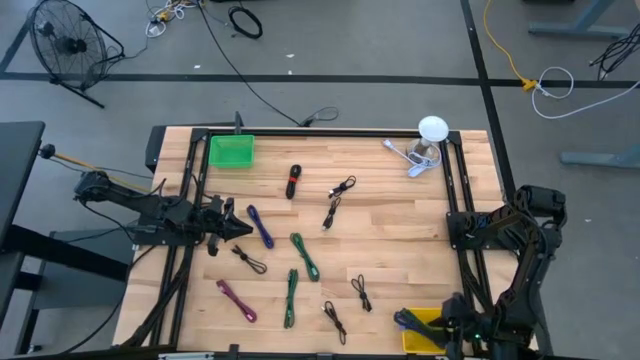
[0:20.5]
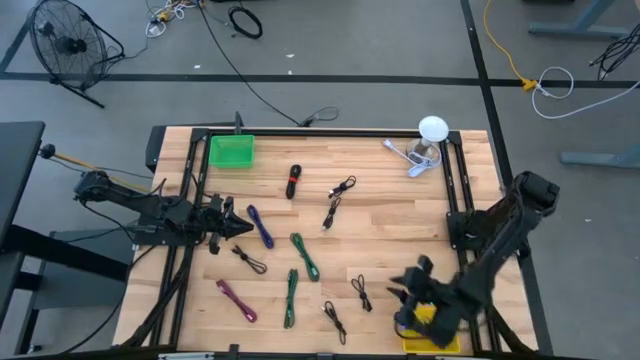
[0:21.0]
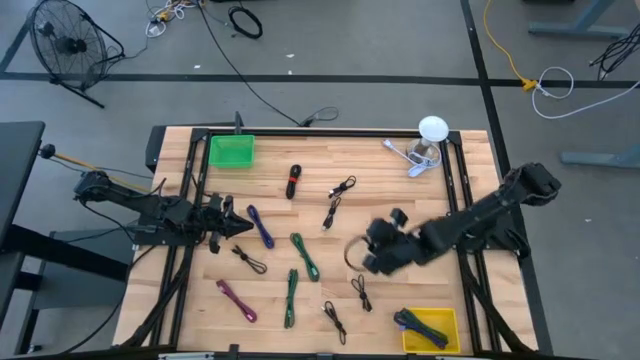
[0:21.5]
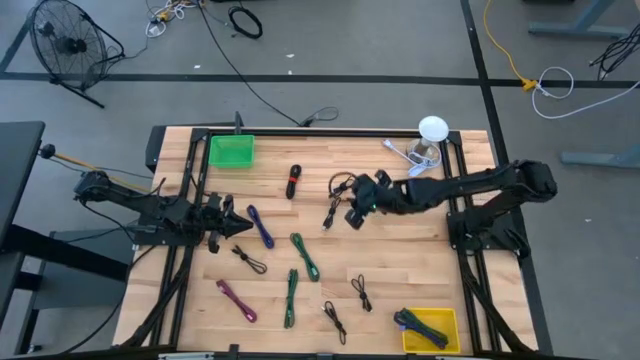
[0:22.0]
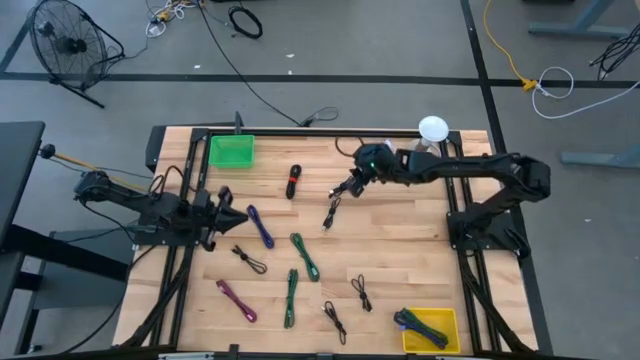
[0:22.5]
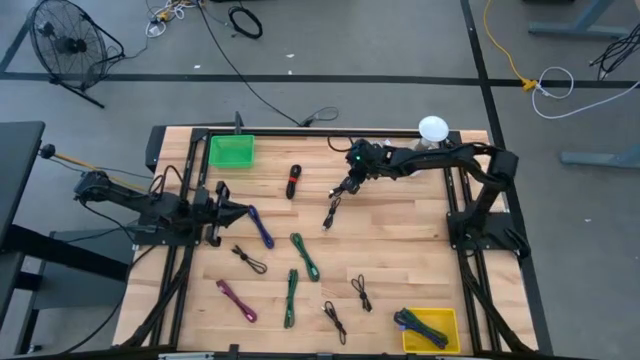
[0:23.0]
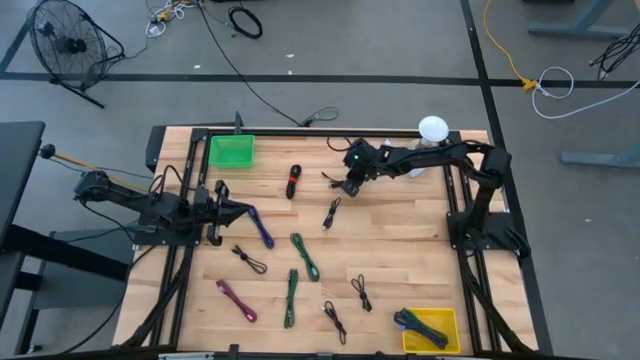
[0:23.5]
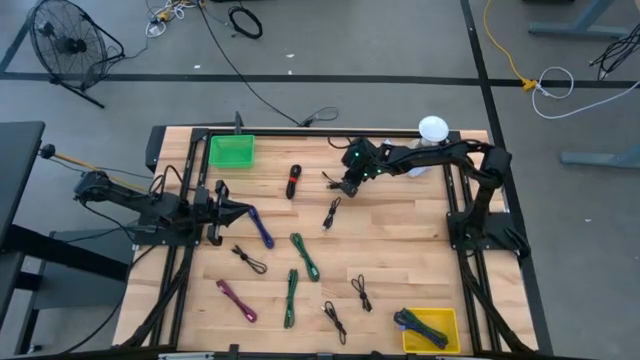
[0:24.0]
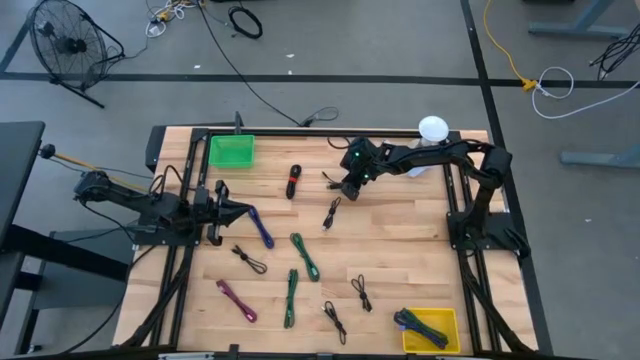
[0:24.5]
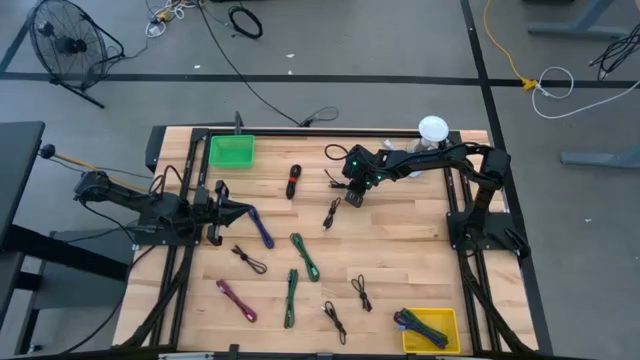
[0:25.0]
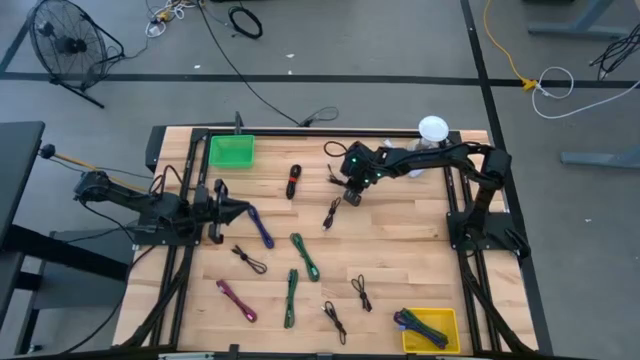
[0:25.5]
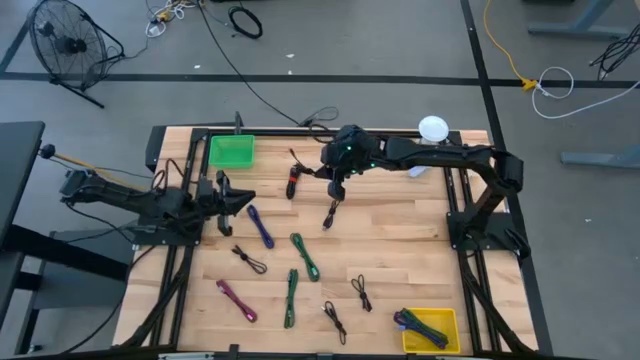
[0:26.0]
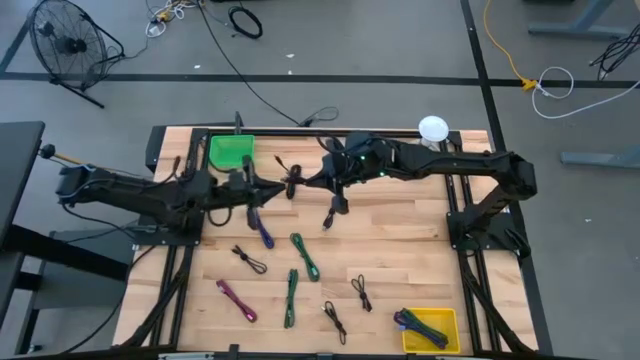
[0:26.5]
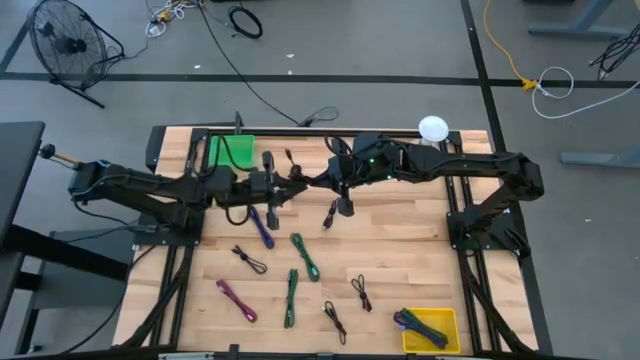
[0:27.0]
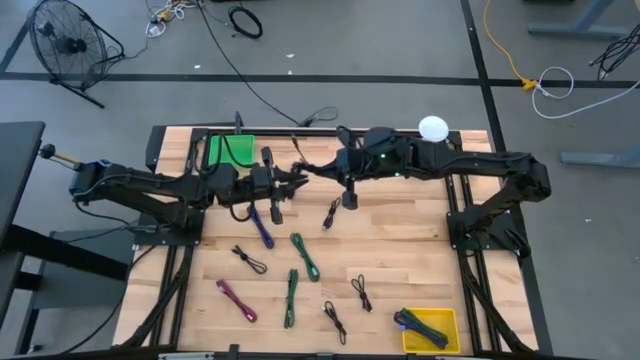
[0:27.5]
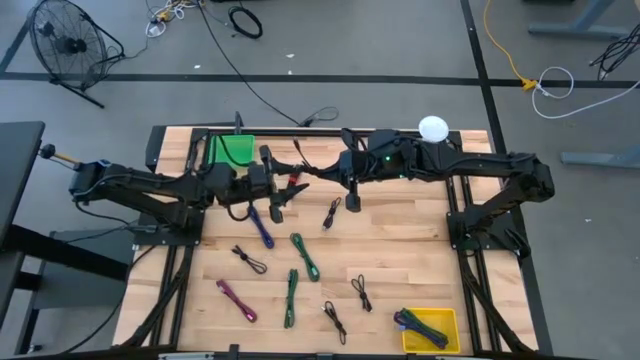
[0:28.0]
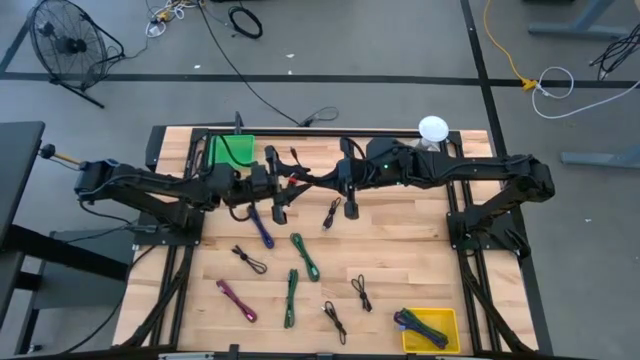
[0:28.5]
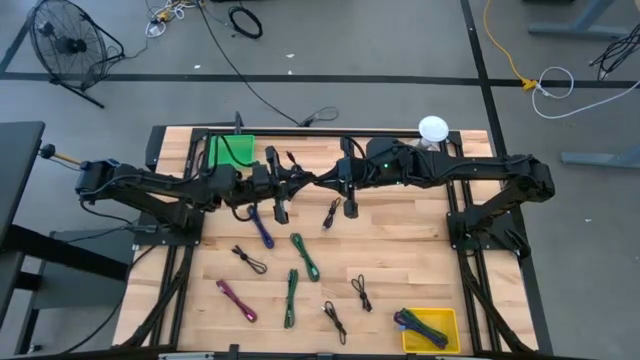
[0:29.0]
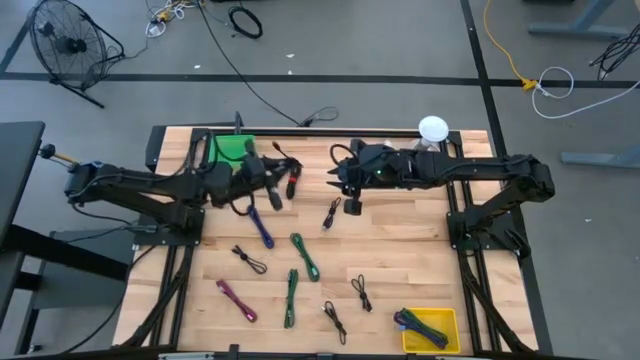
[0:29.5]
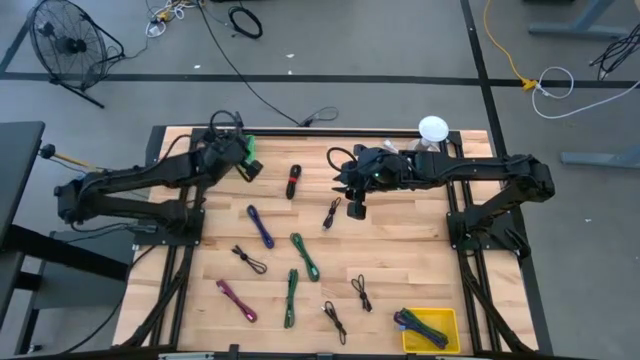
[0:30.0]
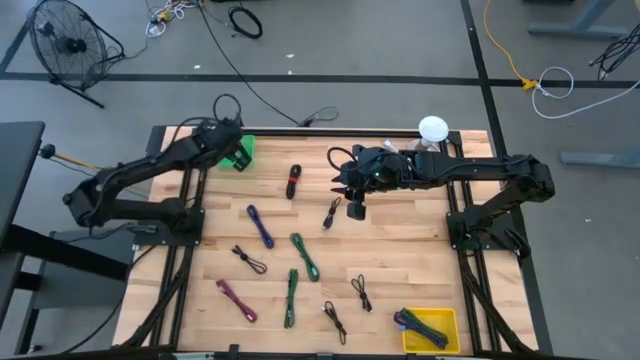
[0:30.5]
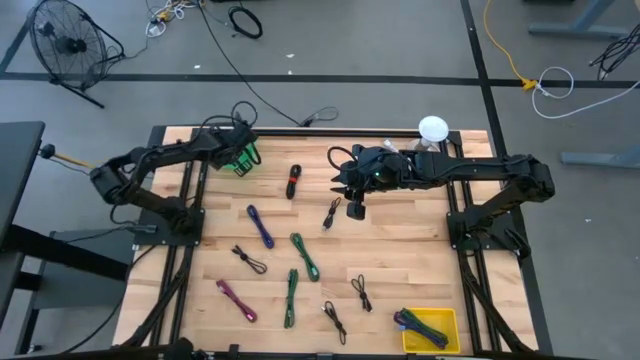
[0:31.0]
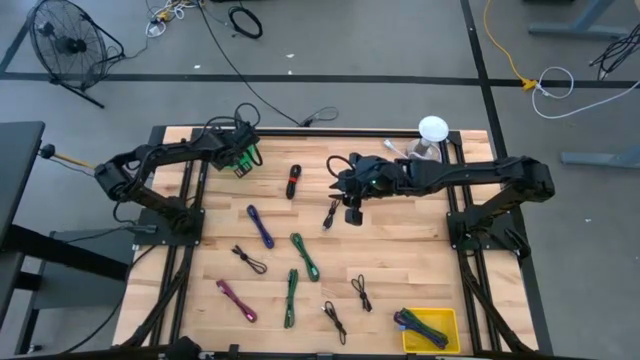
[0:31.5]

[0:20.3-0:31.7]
Task: Pick & Place USB Port
Put the black charger cable into the green bin

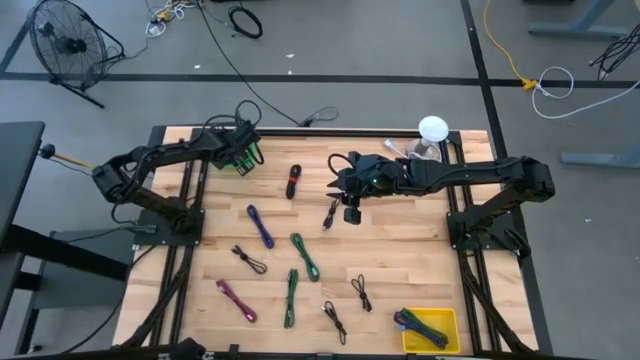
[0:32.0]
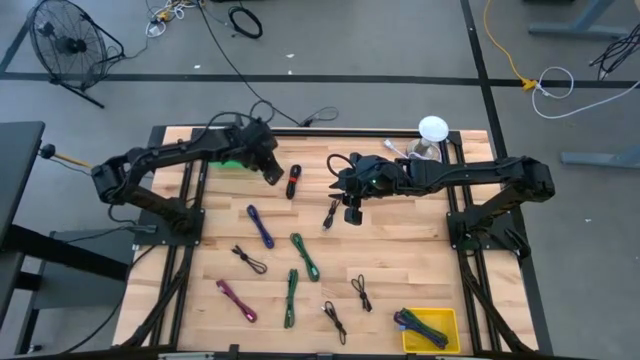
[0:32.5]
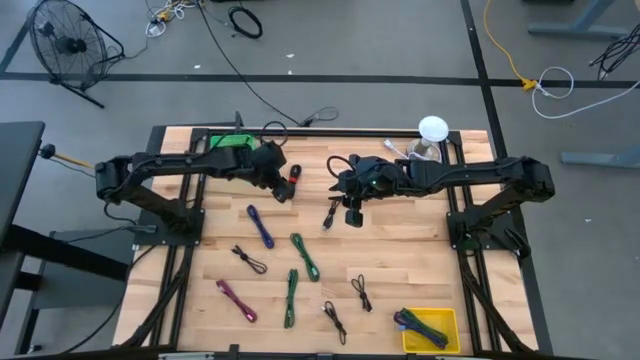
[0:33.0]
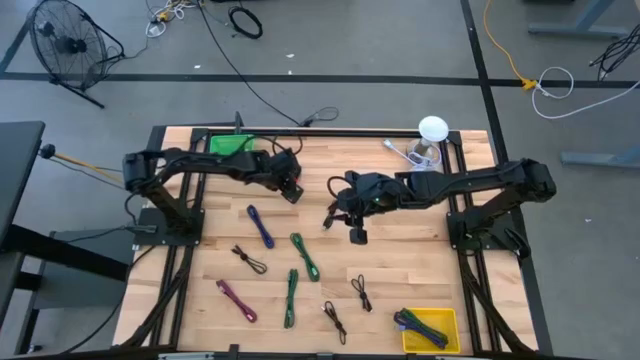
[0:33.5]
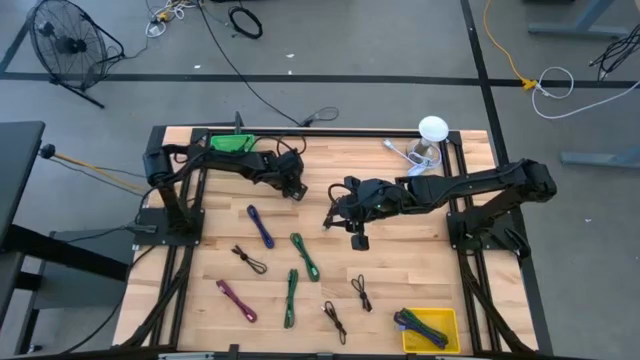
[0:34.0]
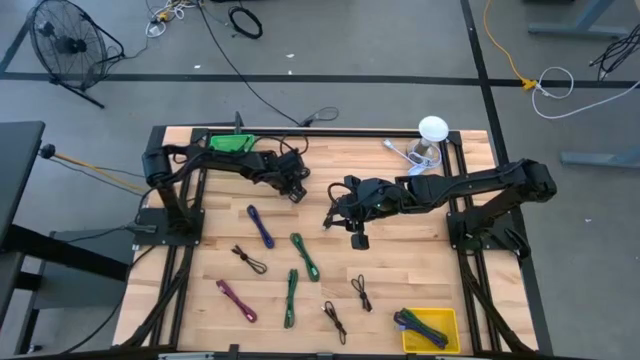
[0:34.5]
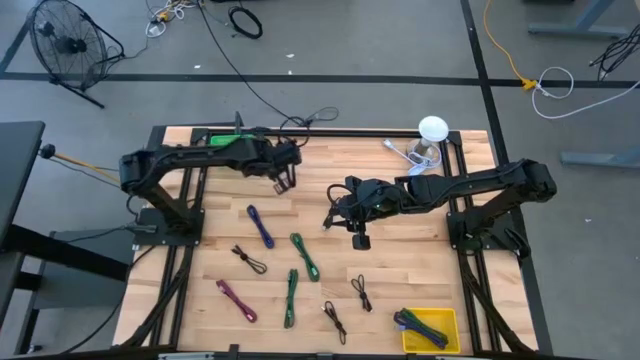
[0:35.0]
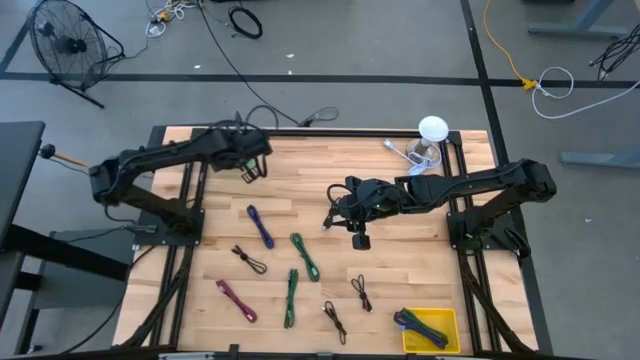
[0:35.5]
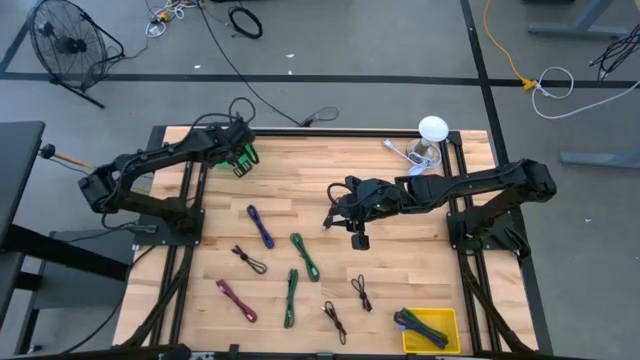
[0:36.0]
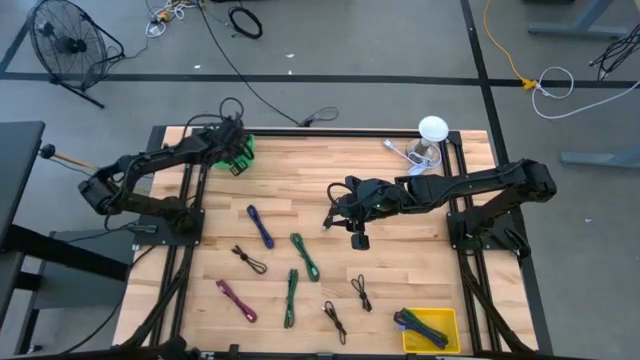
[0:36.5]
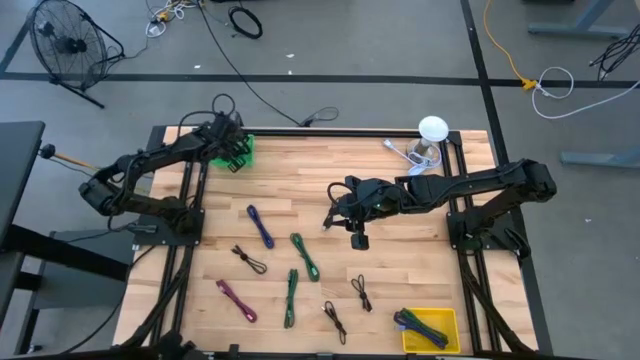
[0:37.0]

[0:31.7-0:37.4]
Put the black charger cable into the green bin

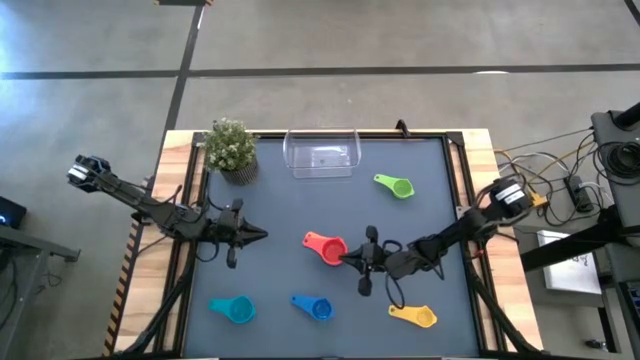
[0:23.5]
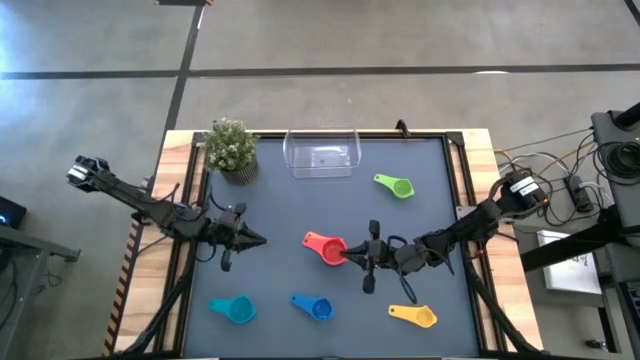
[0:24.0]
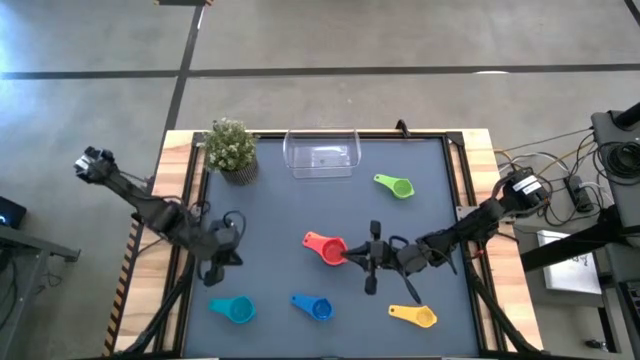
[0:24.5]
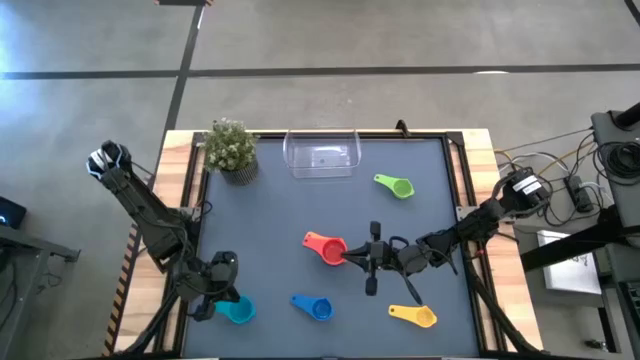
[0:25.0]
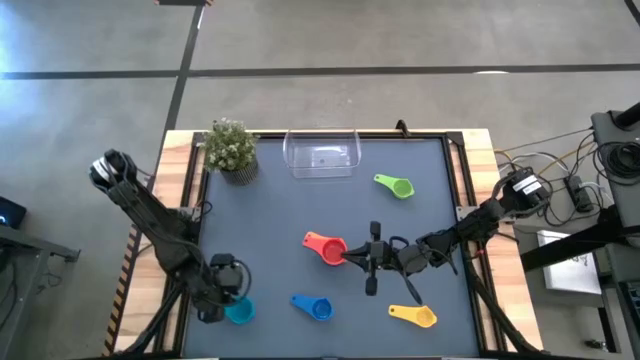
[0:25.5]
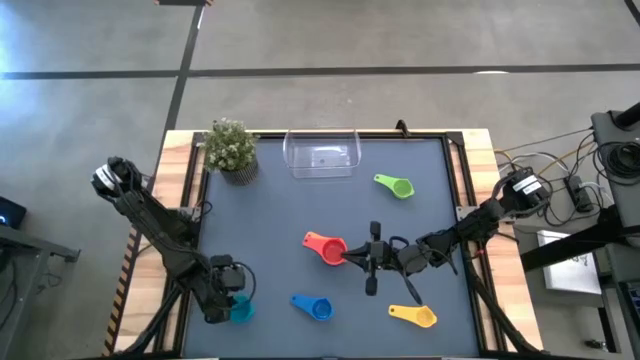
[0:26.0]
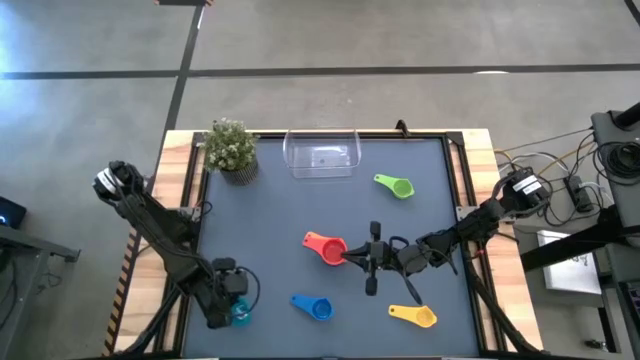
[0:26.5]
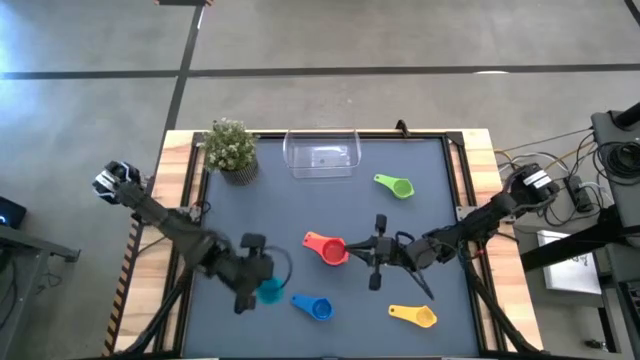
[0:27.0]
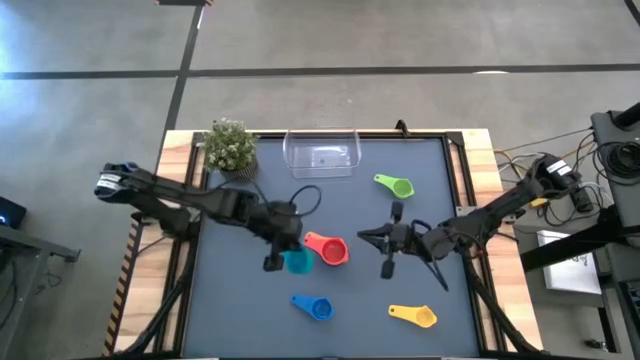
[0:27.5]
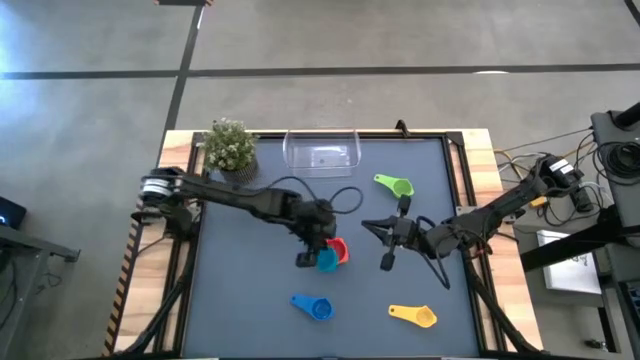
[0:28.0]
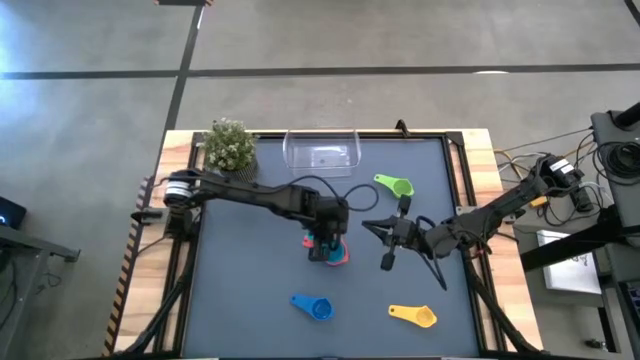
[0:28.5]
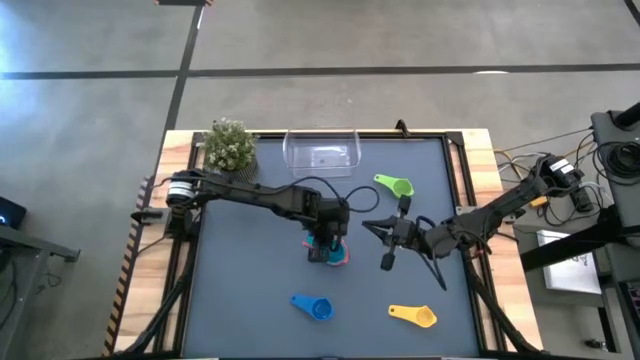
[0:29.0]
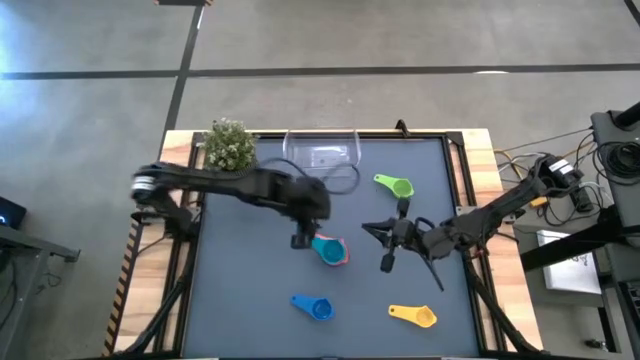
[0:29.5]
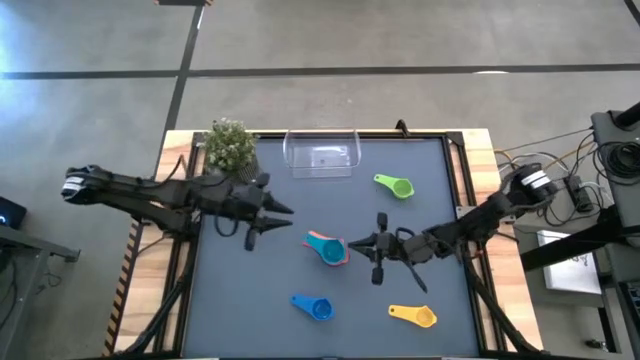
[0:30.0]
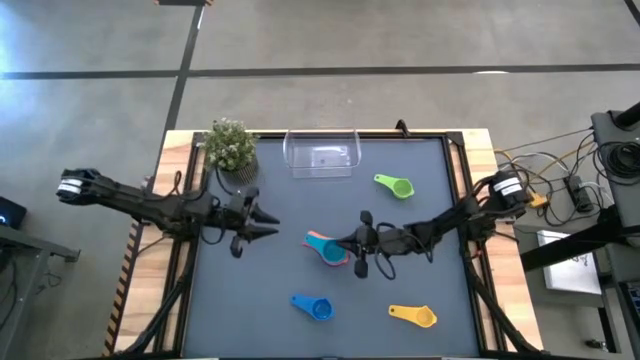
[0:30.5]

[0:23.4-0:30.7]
Task: Nest measuring cups in basket
Stack the light blue measuring cup on top of the red measuring cup
